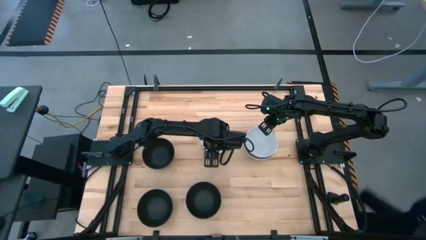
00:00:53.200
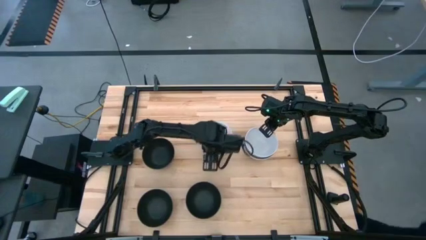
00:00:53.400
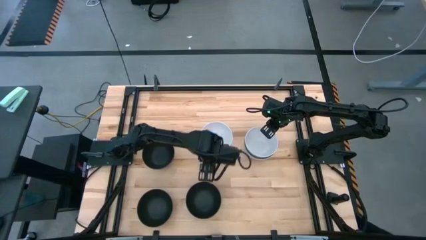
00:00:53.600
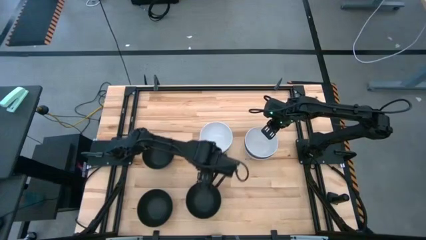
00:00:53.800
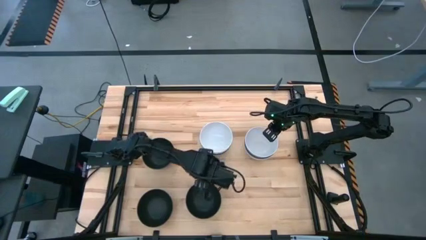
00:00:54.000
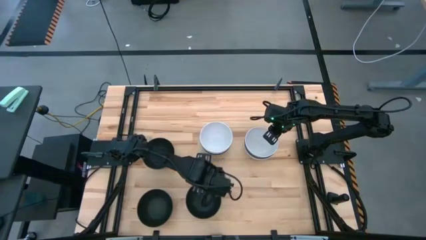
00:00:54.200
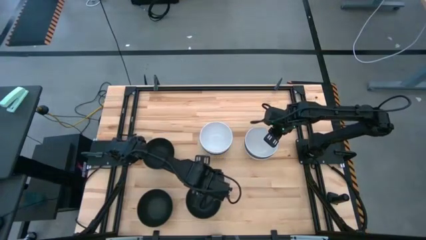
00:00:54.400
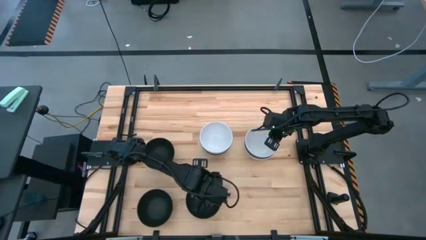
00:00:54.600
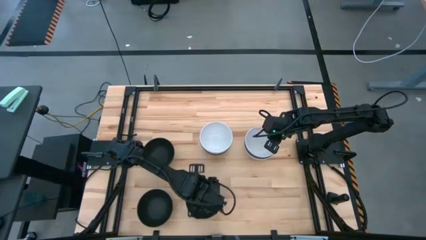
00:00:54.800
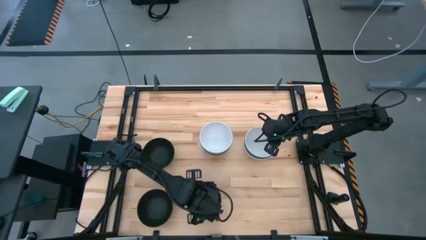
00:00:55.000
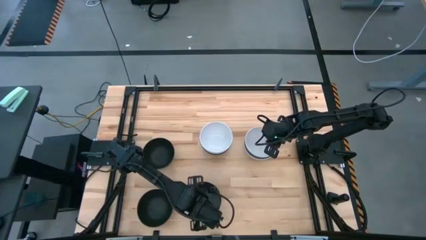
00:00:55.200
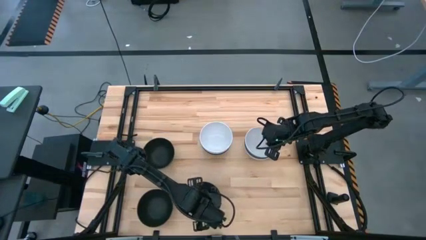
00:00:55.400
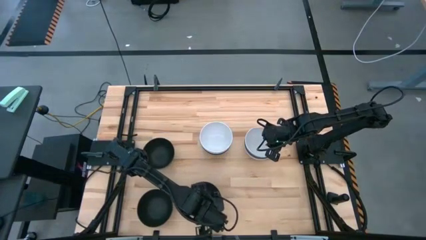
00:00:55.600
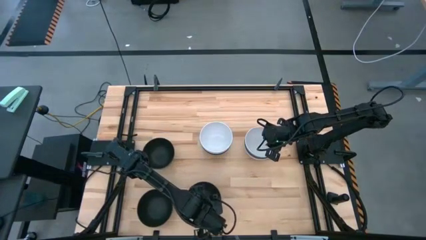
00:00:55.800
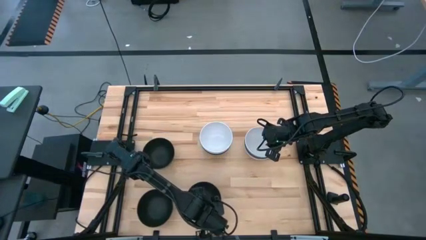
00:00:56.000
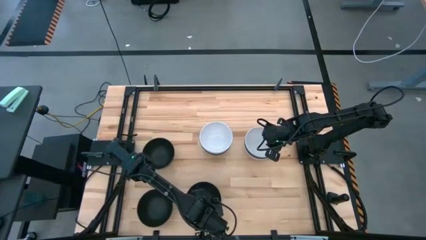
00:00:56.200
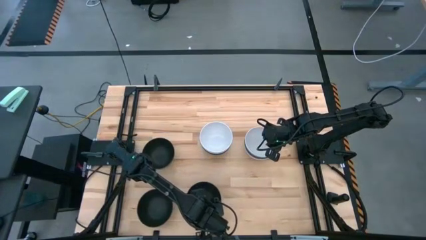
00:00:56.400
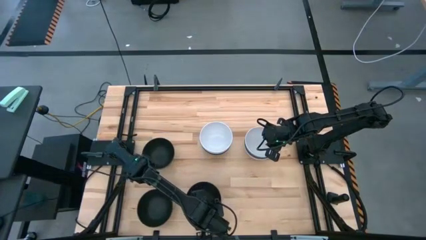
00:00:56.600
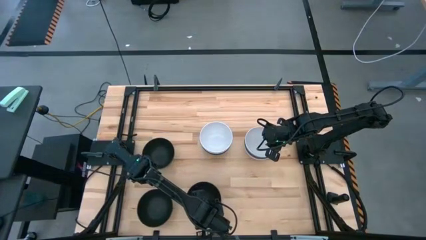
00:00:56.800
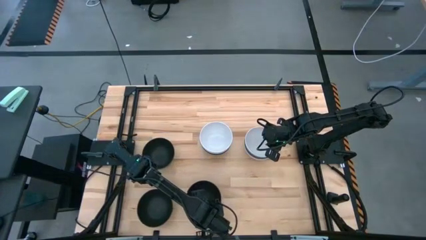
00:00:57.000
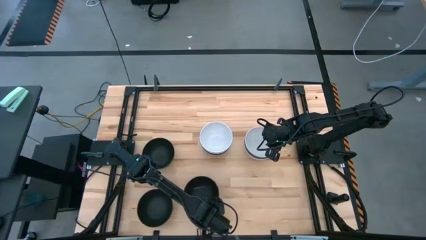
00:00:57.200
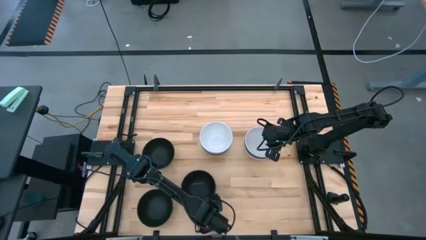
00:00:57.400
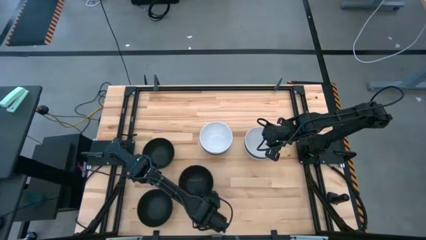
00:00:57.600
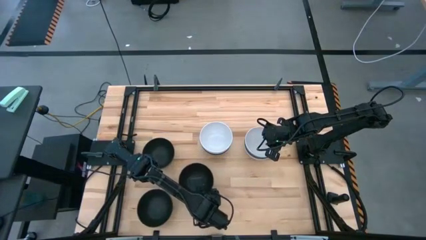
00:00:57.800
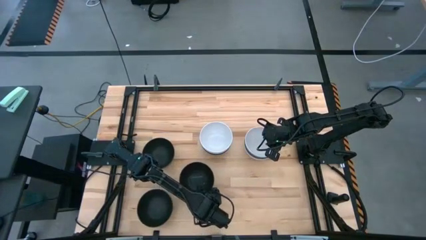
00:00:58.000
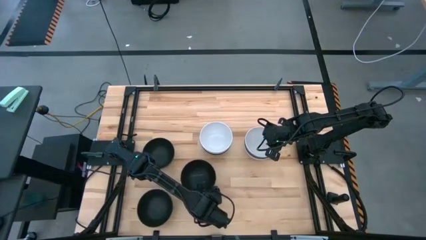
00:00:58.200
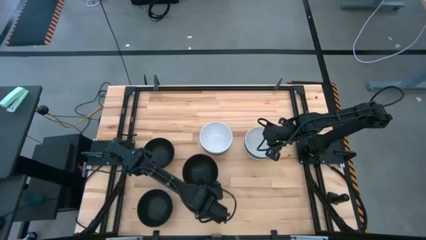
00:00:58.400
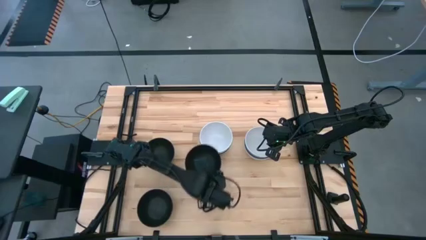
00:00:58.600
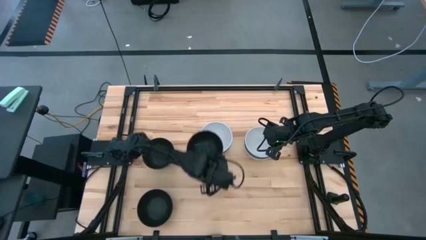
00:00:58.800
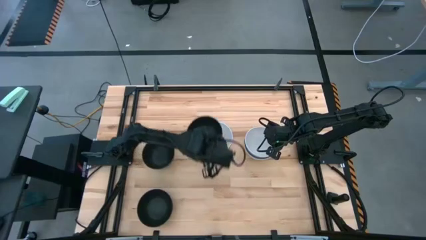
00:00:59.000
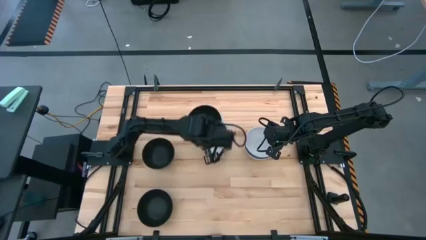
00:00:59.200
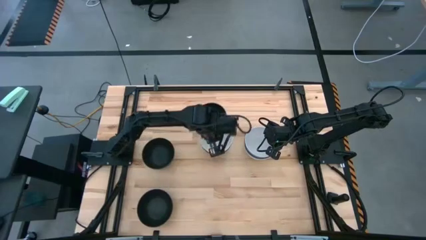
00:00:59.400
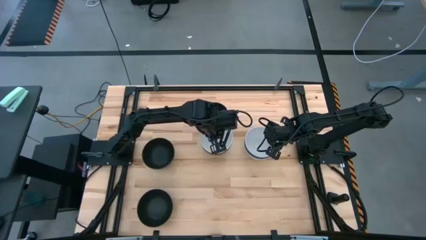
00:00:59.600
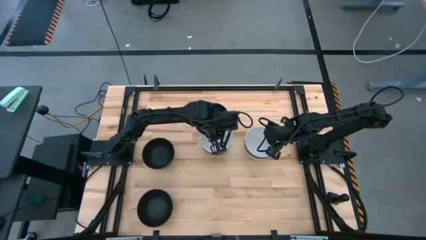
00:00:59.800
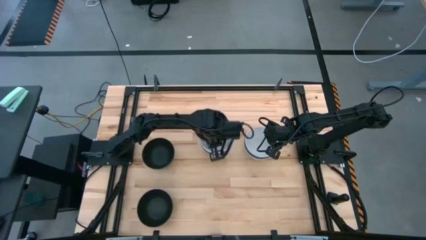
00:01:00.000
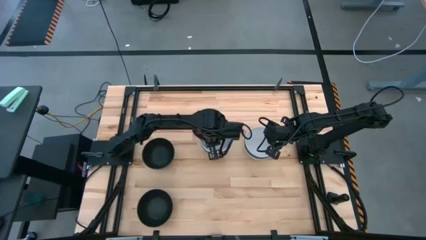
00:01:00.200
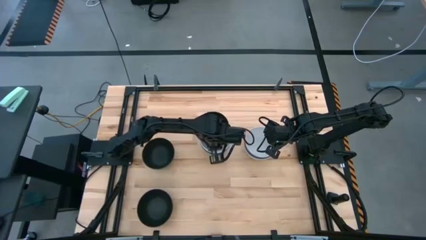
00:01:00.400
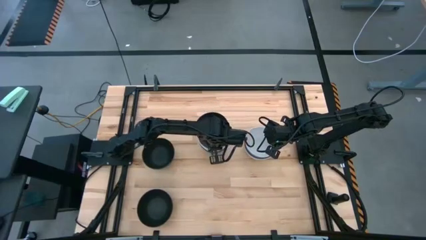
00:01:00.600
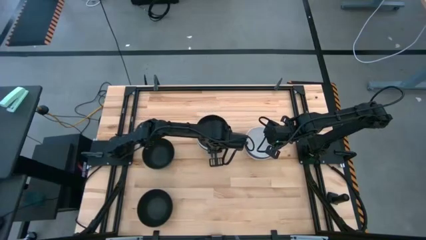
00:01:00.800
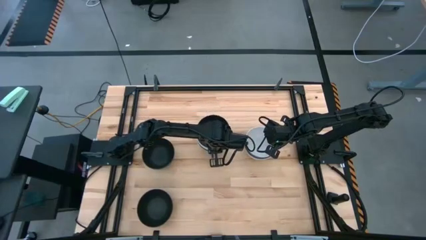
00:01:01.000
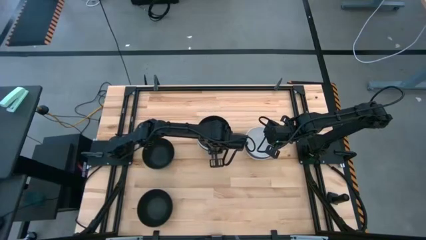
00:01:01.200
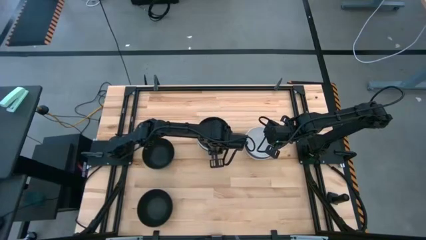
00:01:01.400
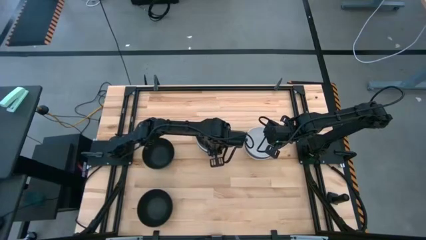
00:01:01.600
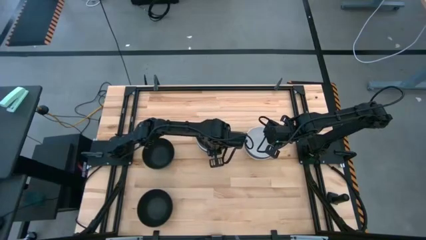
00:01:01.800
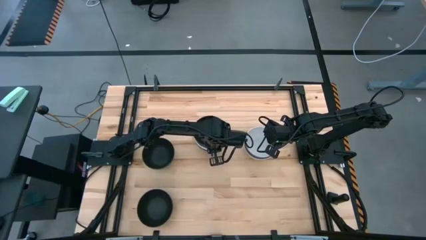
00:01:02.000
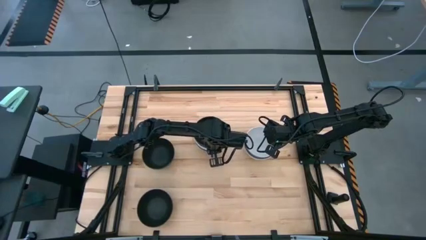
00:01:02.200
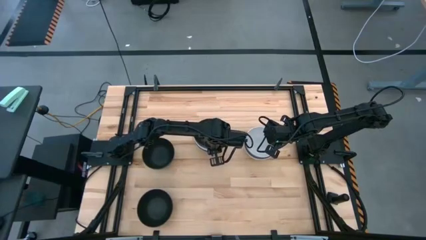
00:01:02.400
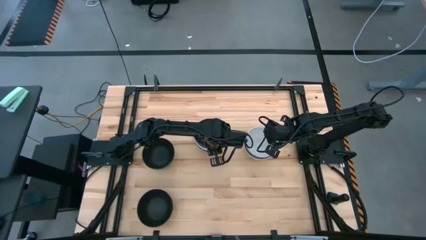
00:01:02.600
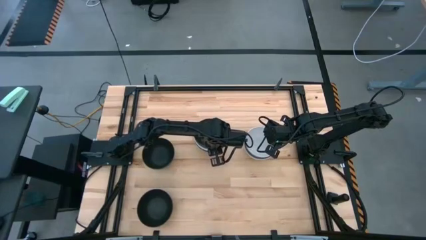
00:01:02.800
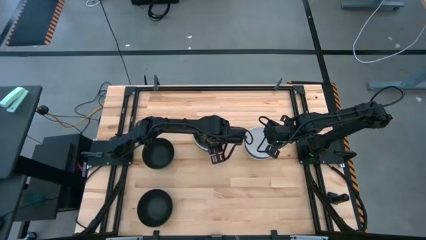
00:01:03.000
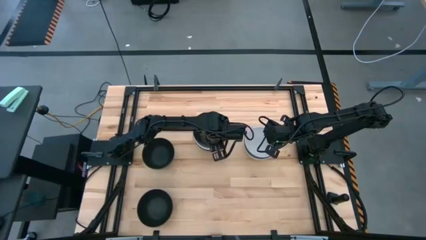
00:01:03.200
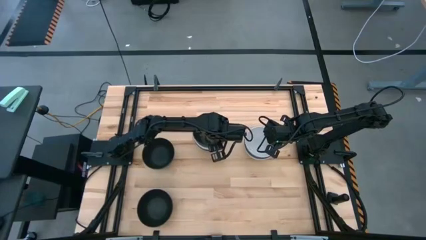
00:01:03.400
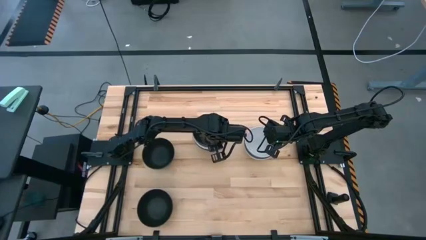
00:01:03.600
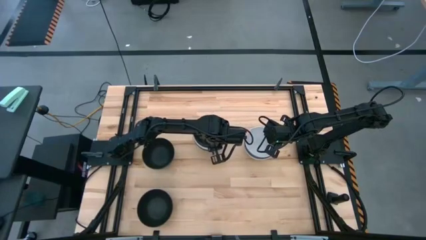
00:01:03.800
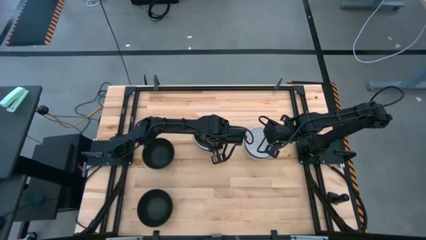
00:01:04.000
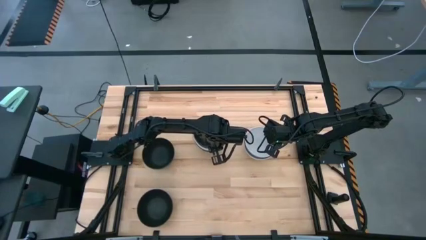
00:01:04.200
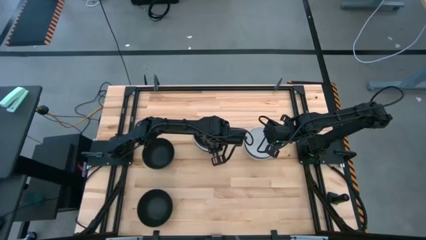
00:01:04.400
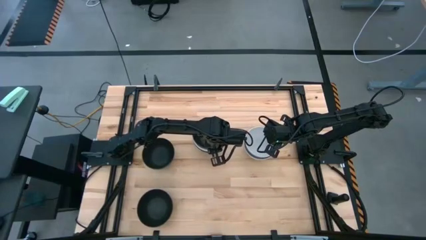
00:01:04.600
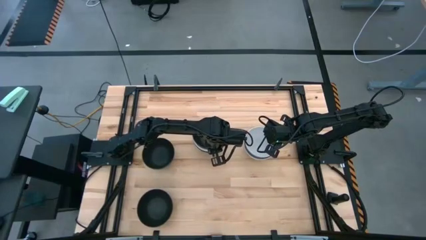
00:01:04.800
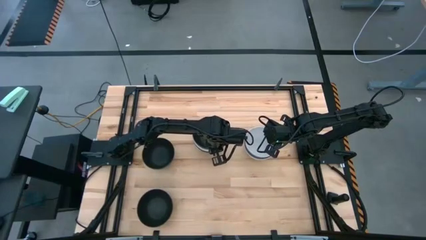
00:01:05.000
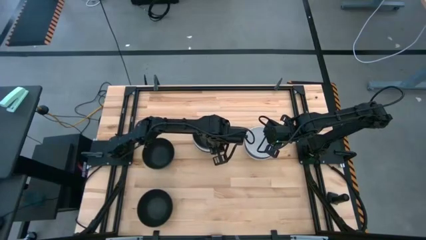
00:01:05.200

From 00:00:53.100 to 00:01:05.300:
Task: Nest bowls inside each other
Stack the black bowl on top of the left white stacked bowls

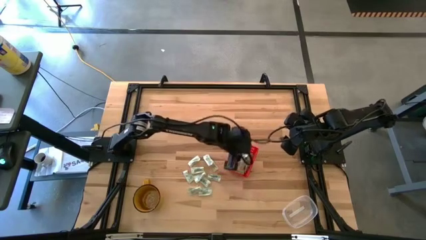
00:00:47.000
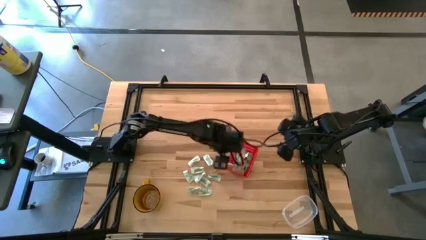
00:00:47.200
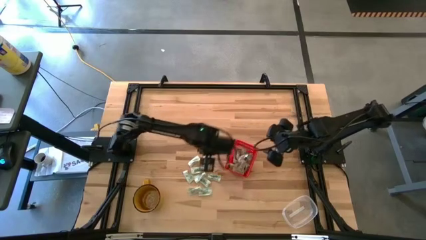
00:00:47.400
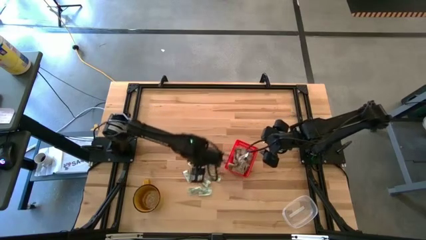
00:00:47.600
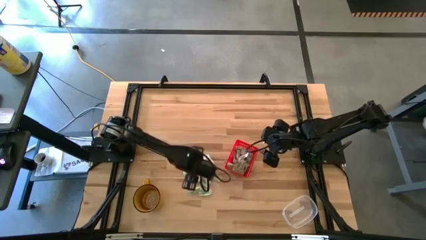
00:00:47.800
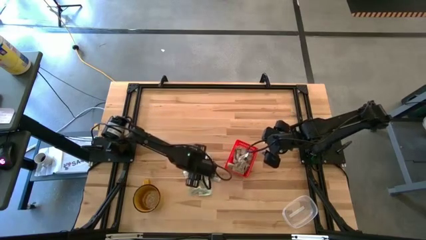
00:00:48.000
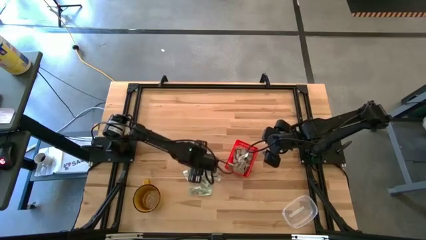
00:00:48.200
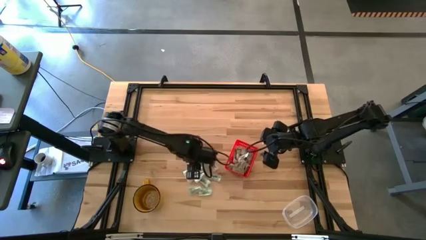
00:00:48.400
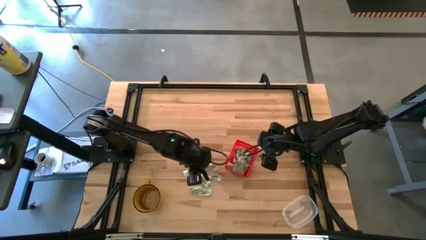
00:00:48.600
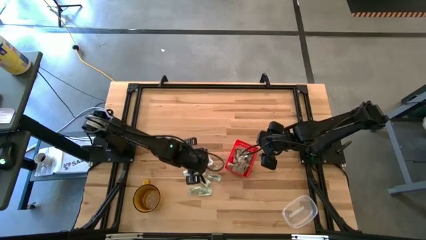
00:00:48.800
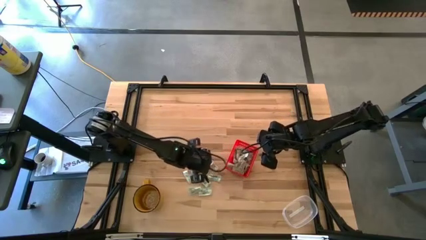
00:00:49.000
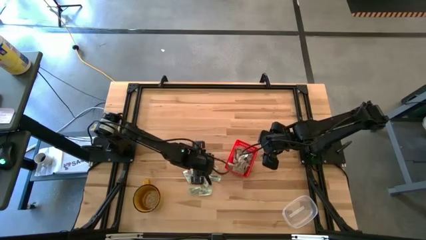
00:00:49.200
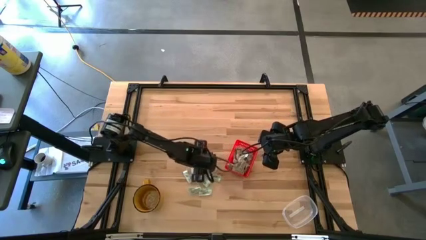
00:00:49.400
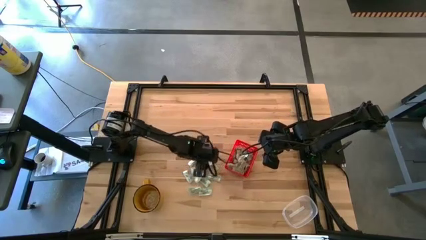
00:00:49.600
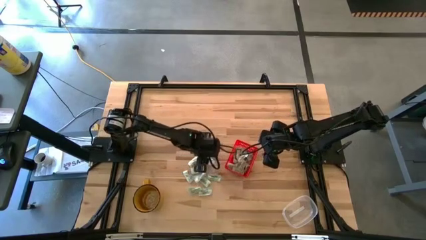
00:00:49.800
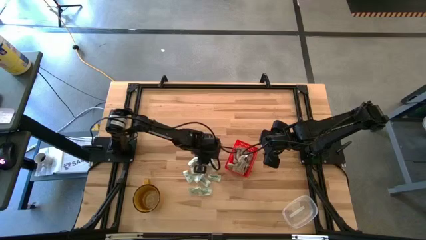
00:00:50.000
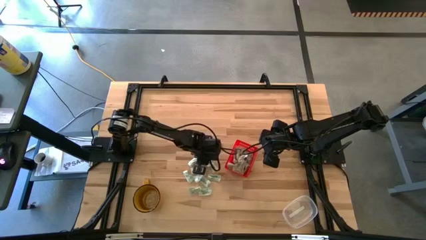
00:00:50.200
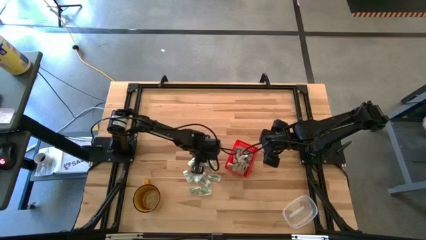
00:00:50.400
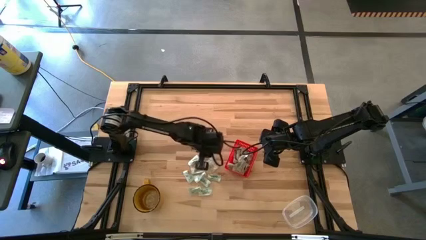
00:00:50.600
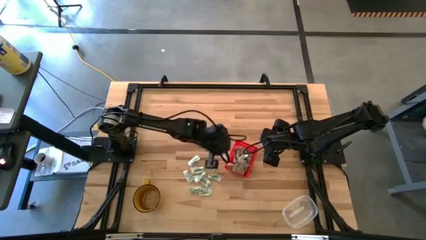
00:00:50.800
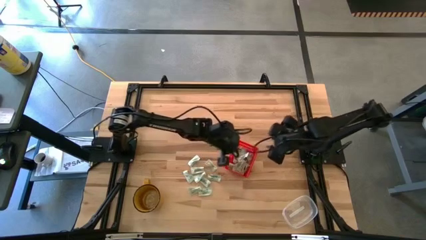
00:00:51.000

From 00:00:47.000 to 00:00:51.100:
Task: Pick and place items into bin
Put the light green stevia packet into the red bin

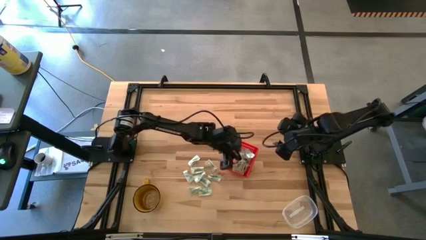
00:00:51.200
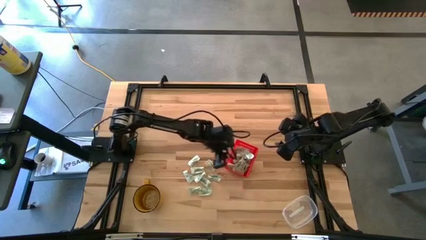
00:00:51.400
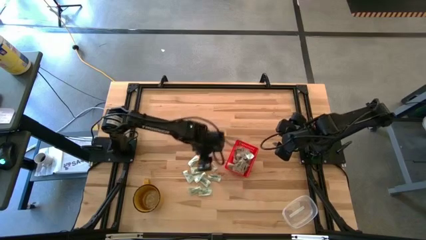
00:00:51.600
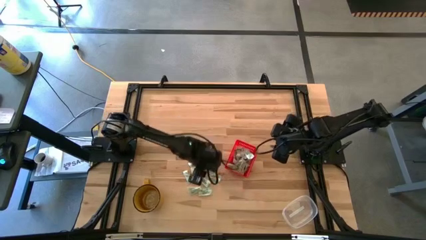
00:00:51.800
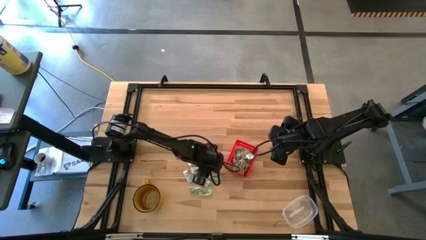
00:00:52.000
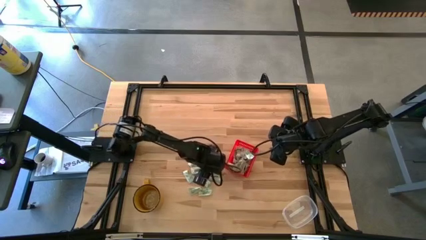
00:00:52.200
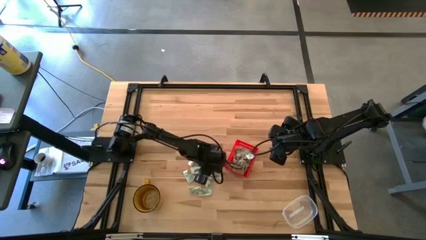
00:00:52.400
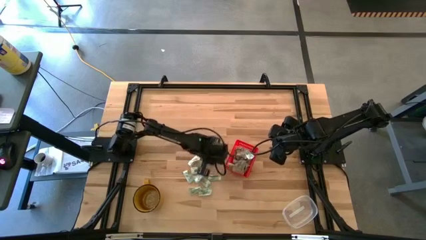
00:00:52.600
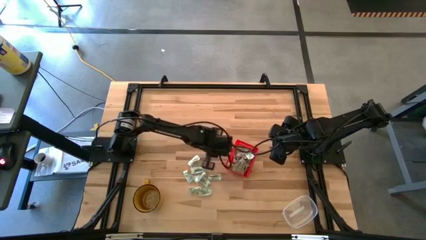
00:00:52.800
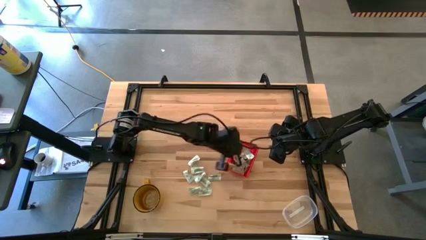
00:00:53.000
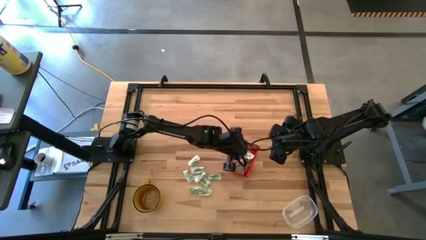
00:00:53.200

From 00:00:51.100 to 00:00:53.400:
Put the light green stevia packet into the red bin
